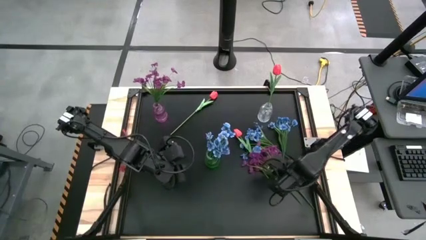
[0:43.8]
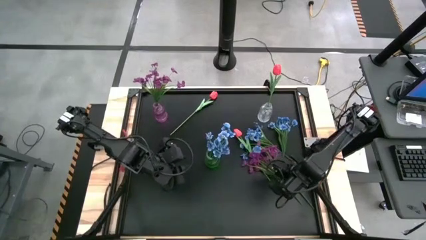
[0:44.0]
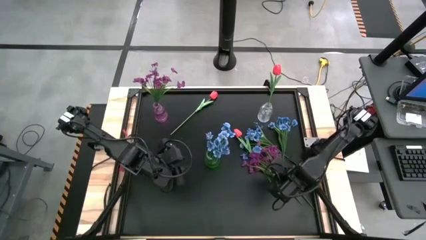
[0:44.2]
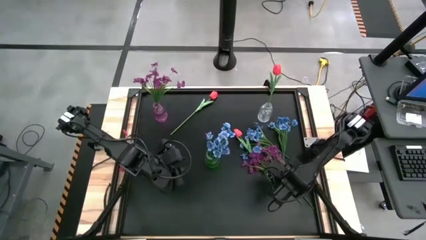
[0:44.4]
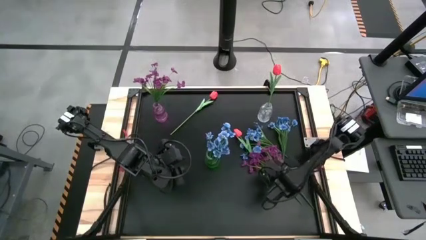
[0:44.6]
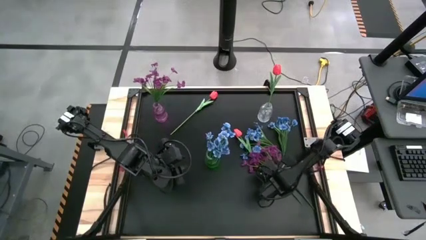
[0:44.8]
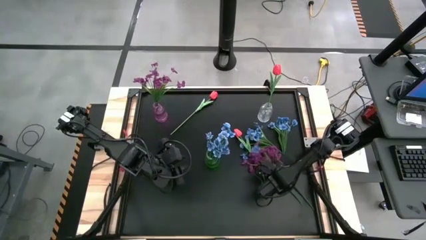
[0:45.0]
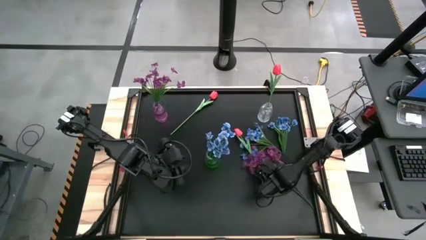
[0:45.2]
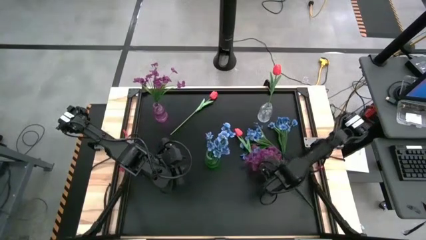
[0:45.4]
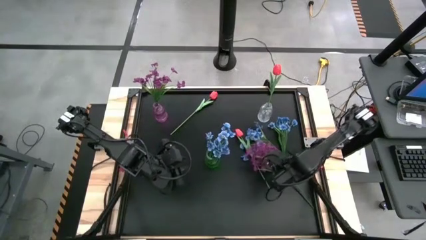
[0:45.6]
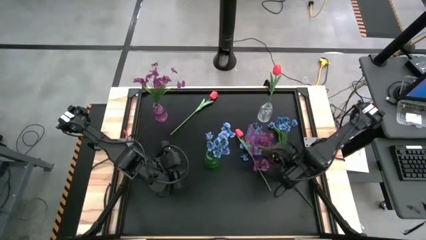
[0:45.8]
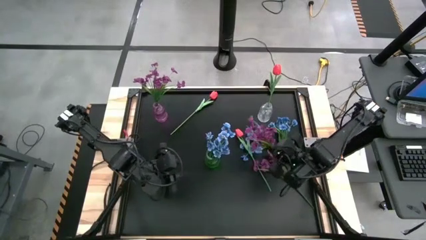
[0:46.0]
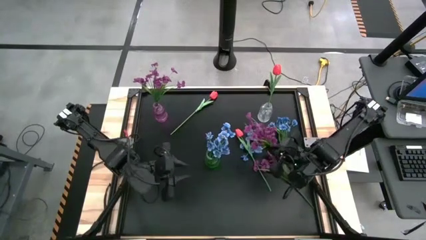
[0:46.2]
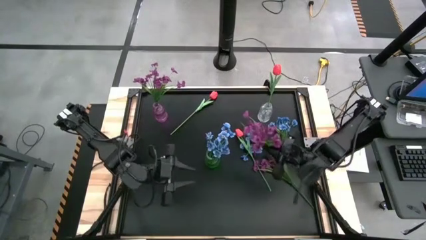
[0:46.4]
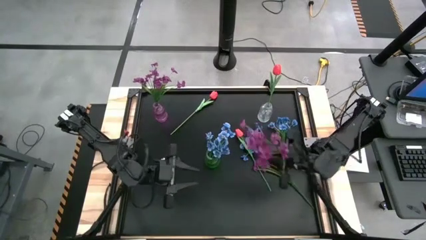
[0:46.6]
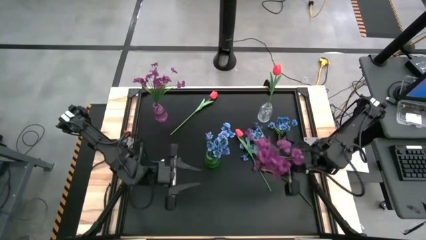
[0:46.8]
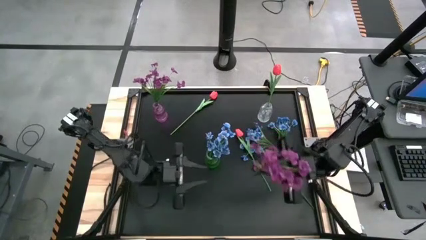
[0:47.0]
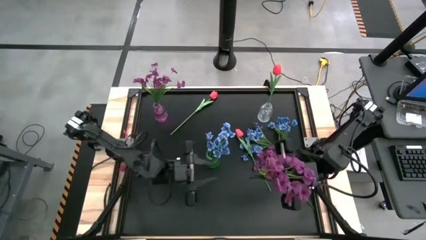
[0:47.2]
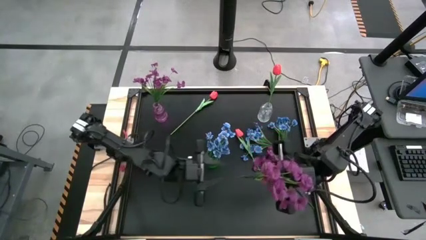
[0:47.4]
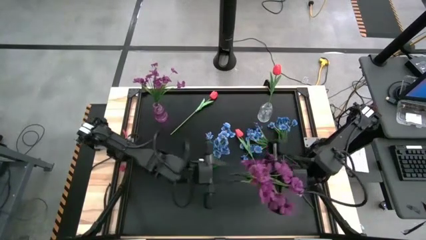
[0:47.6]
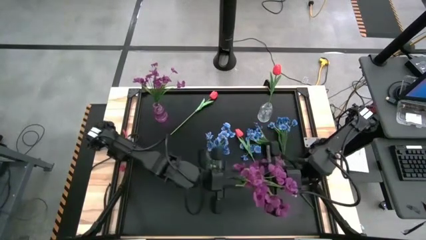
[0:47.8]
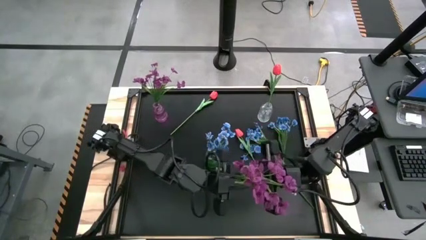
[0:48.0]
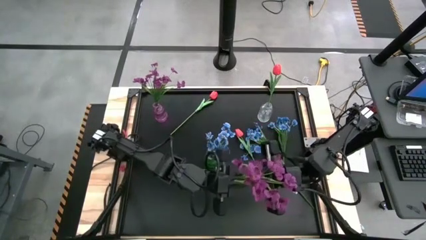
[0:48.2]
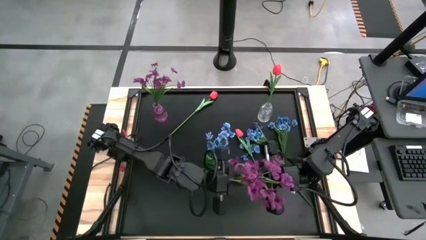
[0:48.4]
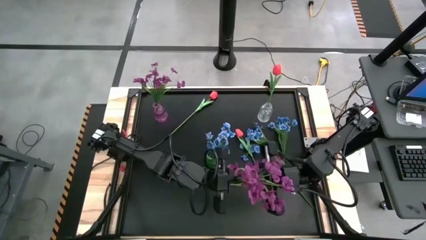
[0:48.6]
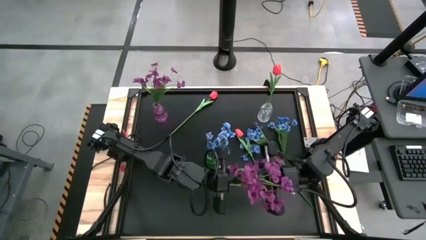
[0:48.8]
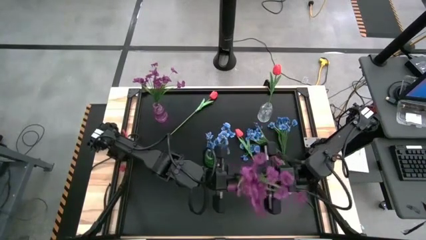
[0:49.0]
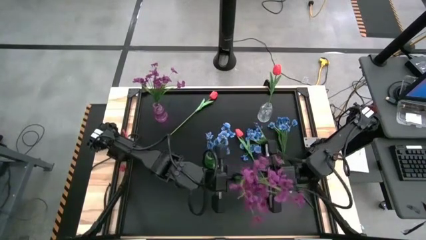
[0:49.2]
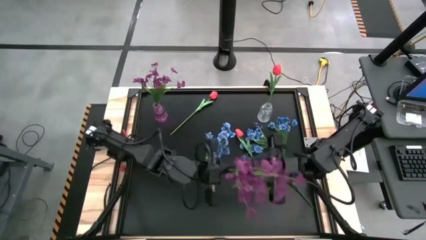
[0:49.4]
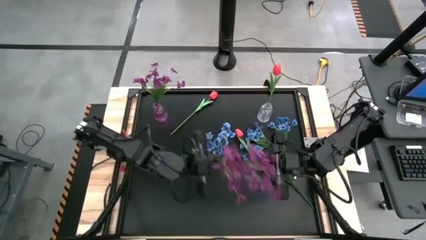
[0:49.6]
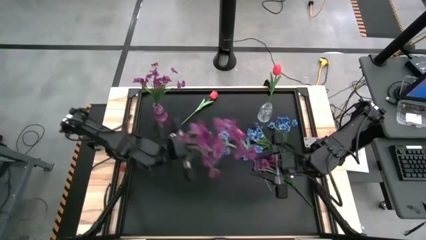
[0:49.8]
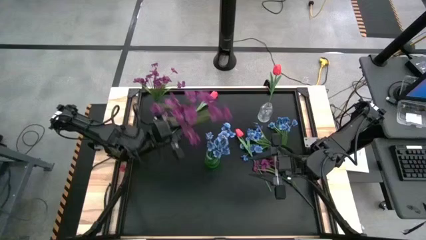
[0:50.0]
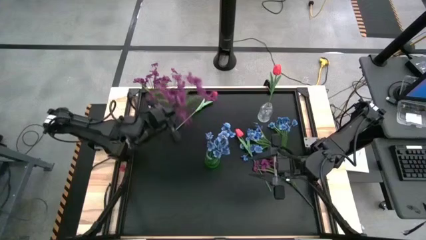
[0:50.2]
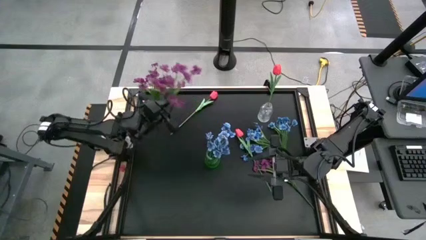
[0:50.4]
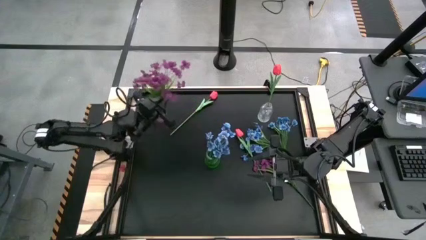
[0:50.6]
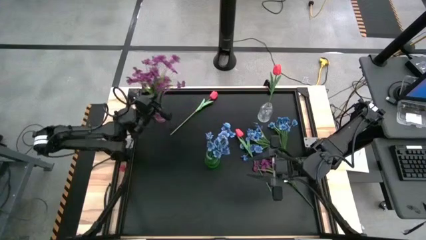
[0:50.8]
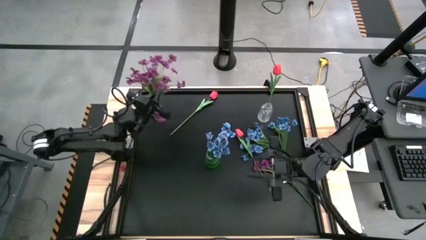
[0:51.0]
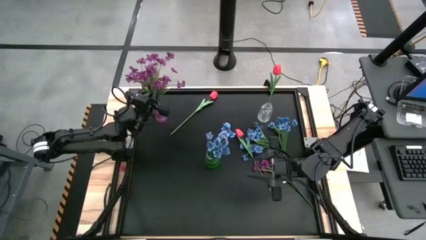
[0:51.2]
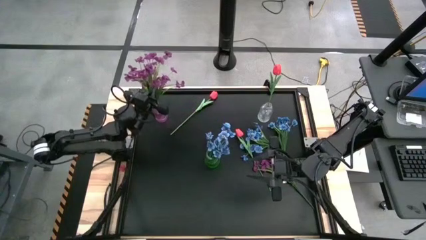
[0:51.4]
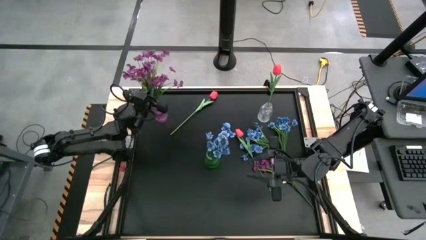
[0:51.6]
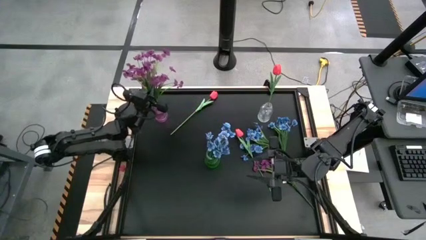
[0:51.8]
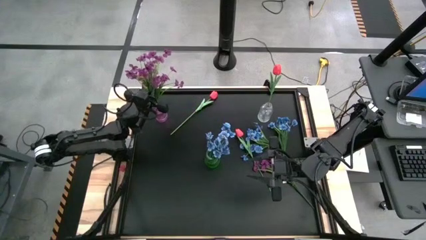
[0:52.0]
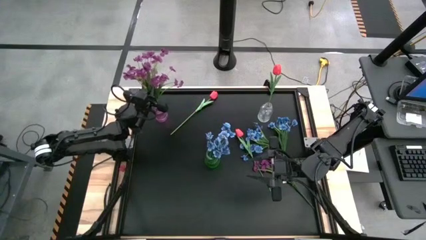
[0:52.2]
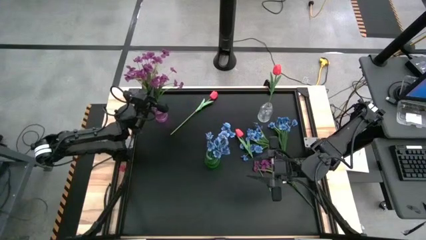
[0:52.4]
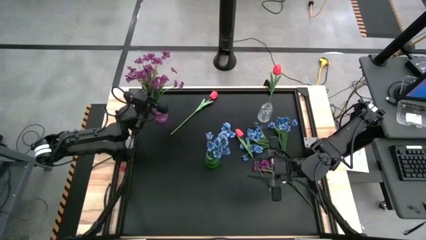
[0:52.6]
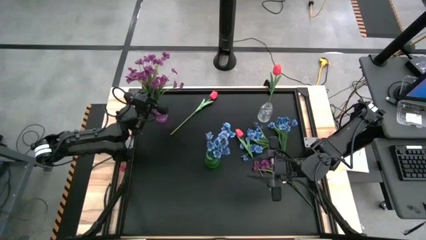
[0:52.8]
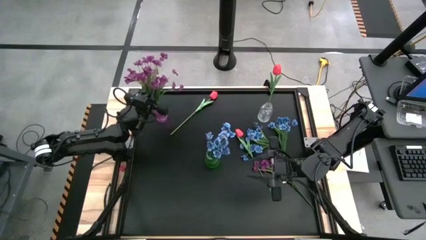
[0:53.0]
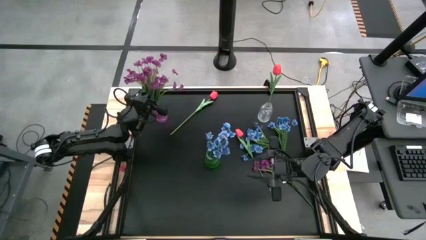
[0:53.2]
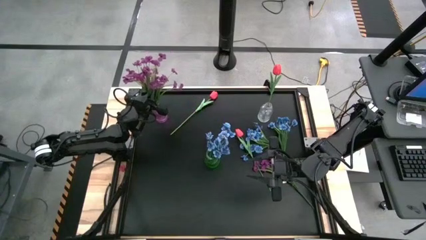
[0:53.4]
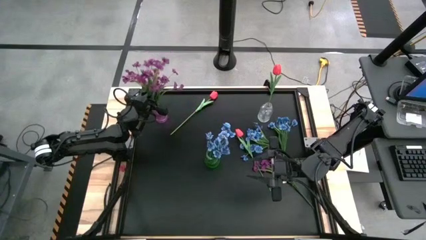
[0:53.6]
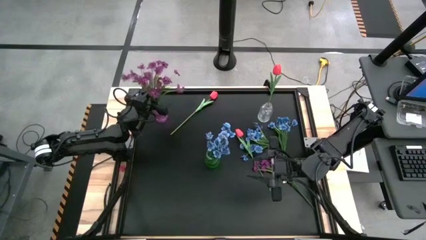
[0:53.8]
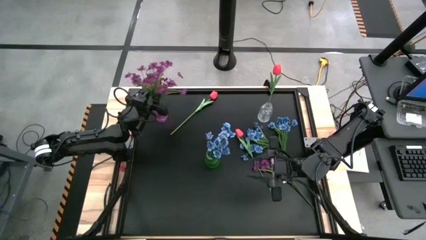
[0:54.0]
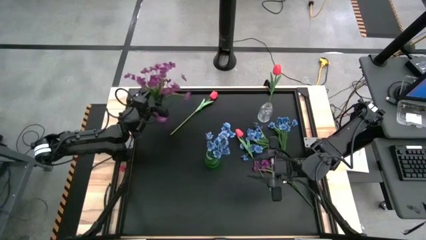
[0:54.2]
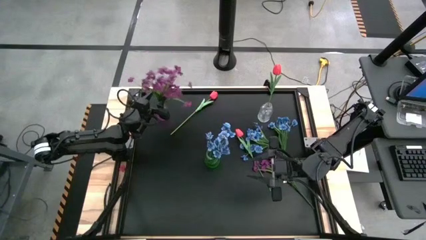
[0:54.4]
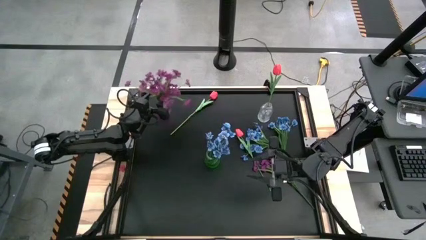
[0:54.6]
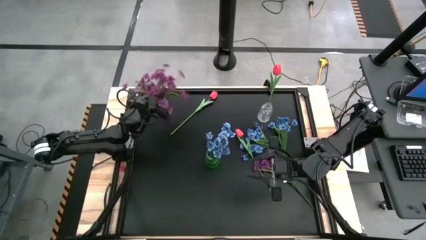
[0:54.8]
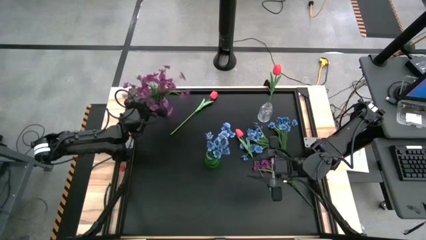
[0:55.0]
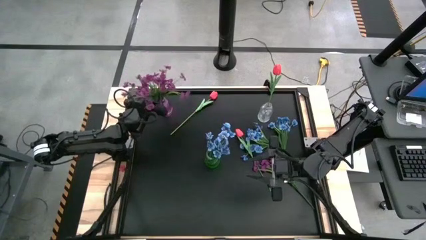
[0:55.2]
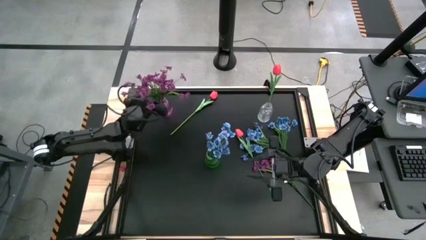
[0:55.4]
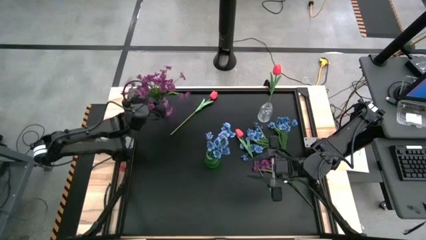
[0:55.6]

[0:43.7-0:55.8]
Task: Sort flowers into vase by color
Put the left purple flower into the purple crystal vase
